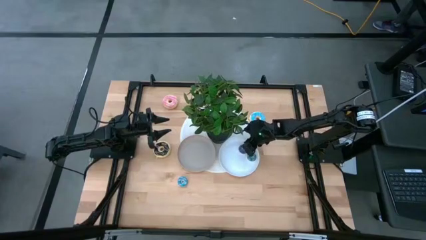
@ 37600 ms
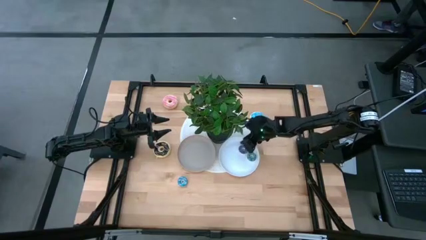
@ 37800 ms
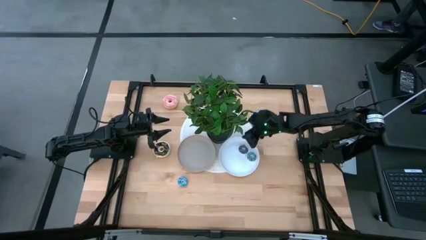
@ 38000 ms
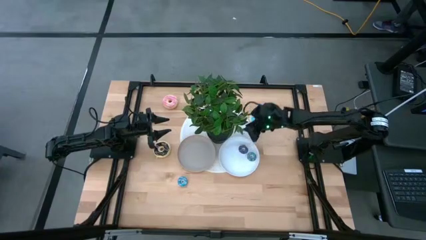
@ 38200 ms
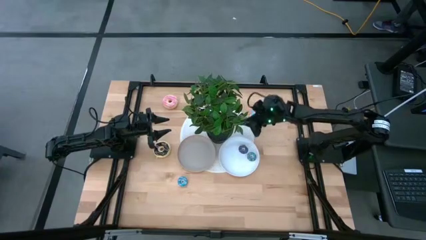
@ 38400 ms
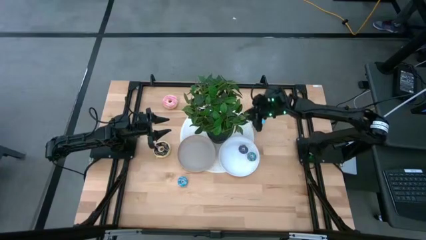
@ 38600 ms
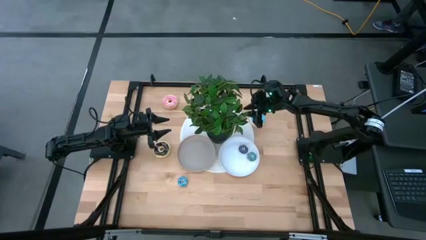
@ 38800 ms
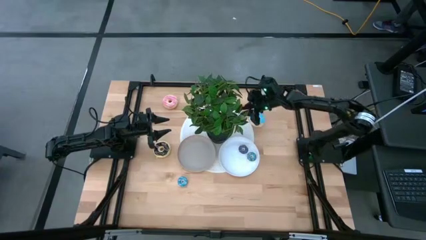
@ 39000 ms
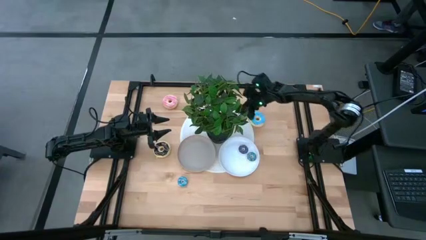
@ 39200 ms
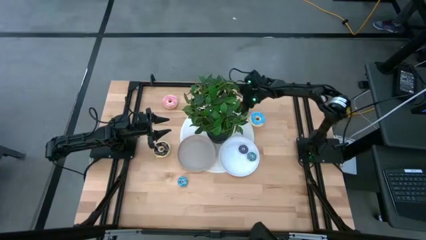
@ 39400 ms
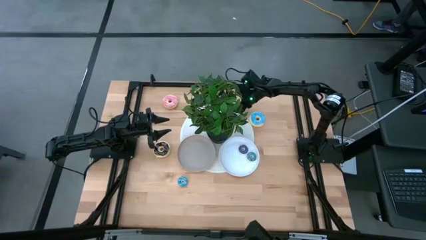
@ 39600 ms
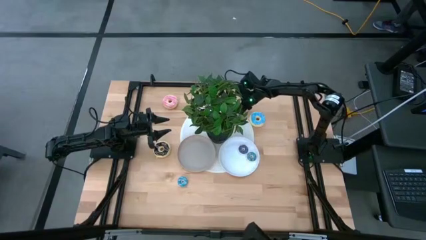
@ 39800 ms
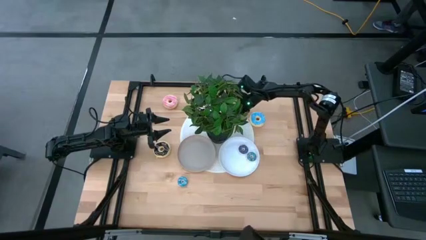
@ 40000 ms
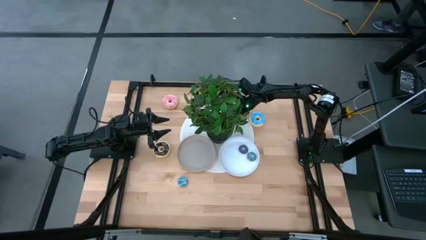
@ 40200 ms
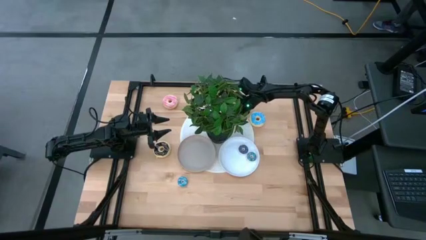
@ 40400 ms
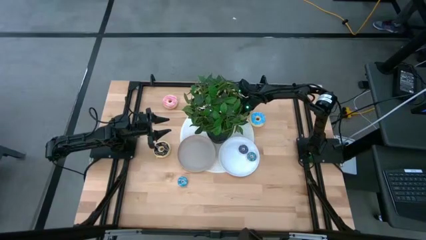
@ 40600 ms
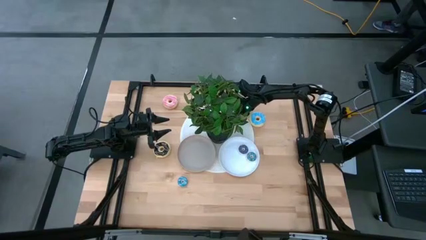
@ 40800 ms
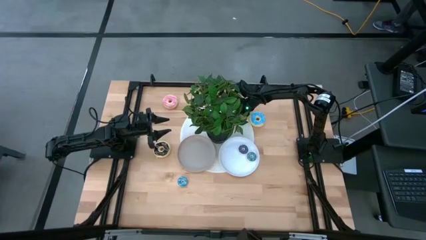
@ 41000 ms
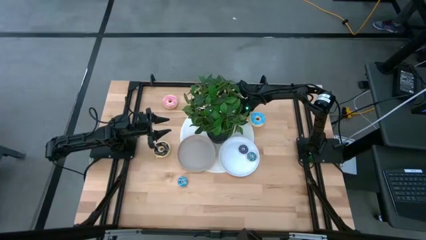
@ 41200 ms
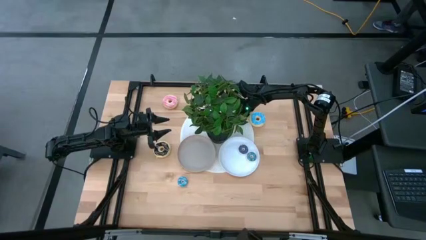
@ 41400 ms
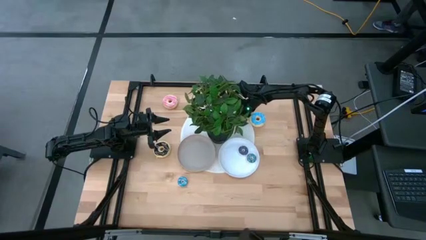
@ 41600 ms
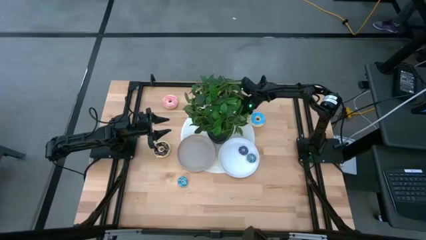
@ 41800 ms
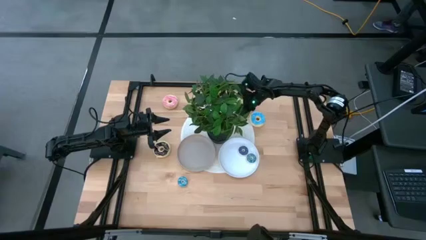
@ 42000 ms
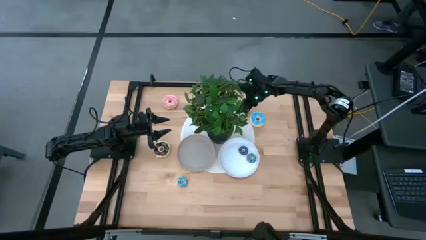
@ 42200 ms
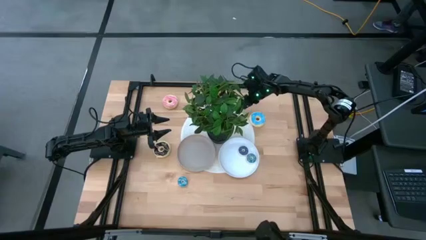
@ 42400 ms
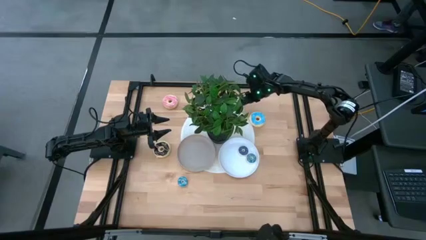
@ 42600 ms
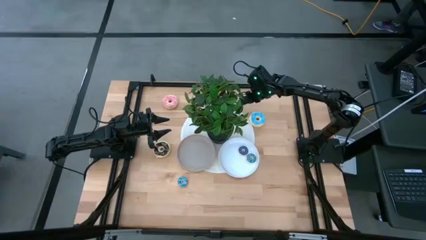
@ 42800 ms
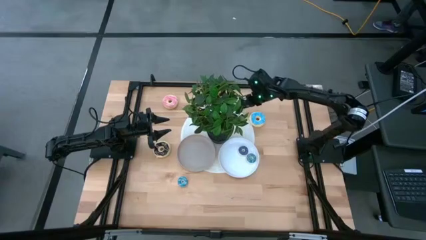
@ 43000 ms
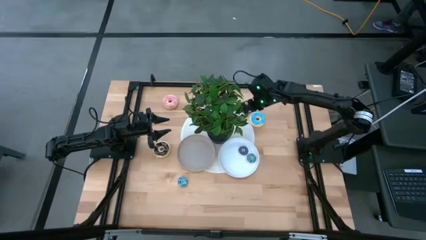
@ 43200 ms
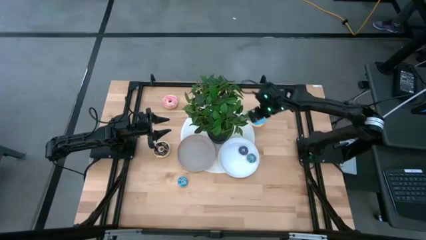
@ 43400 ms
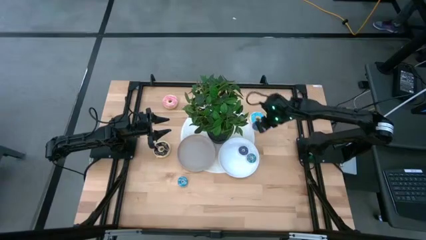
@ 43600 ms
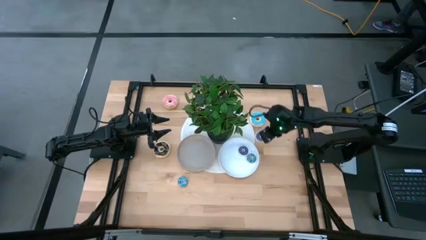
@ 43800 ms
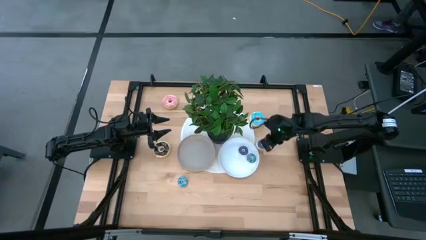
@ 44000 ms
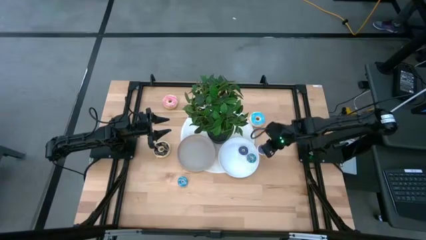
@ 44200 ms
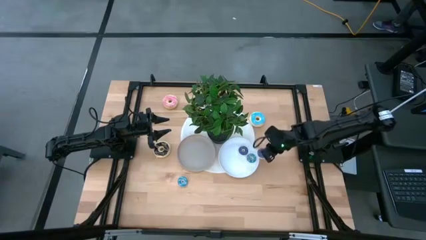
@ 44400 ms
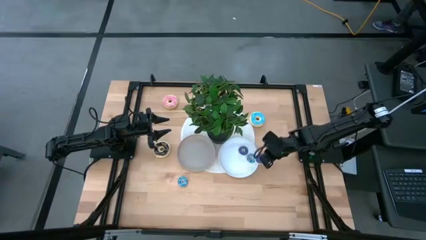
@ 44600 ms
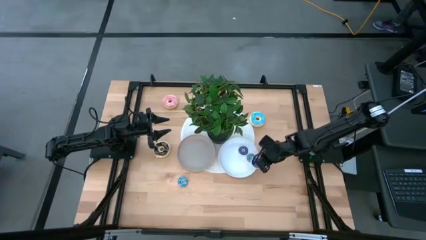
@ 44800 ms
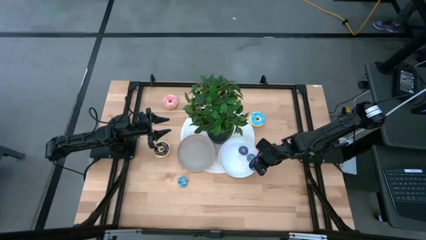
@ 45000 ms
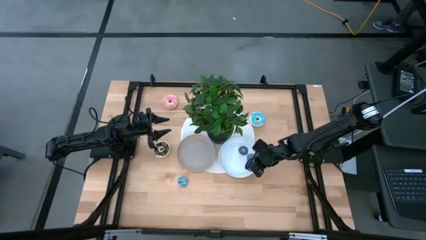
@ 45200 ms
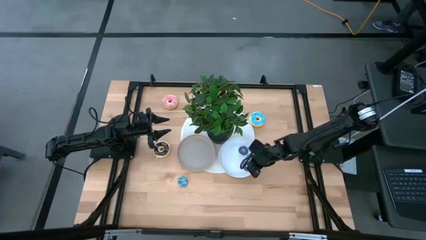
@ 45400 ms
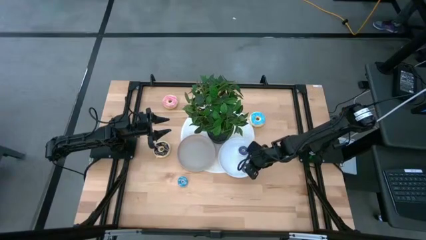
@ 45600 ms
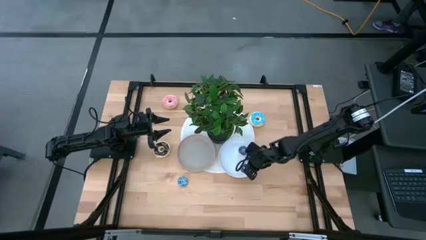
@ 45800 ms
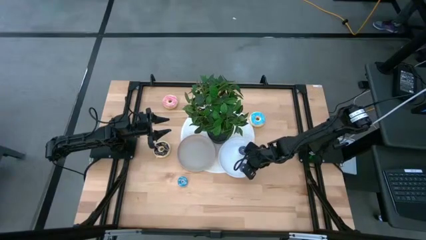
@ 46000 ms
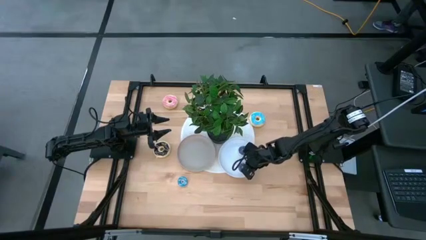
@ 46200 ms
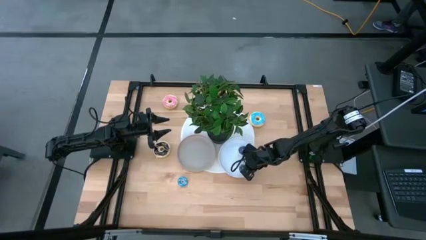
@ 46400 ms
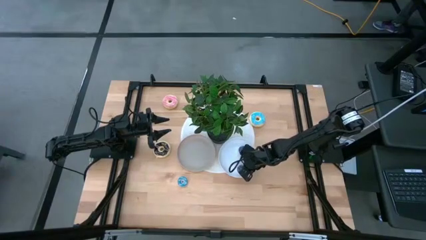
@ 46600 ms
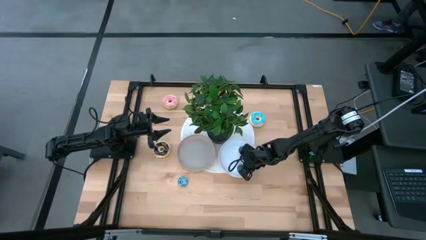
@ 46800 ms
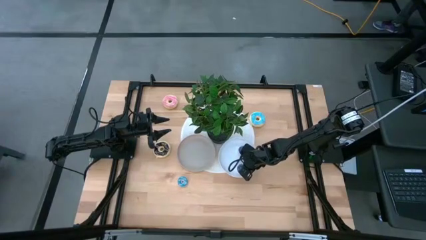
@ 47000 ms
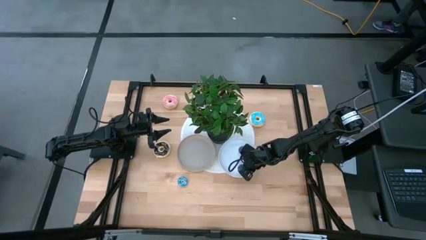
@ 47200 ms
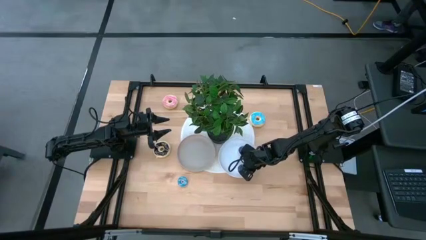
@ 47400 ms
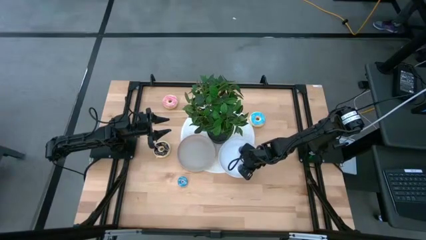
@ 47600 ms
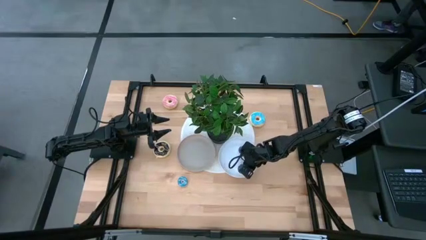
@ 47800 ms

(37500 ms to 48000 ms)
Task: Pick & Place donuts
Put the small dark blue donut on the white plate

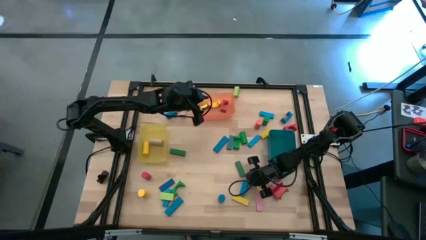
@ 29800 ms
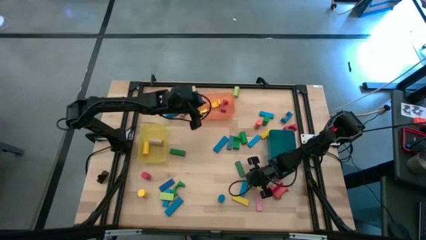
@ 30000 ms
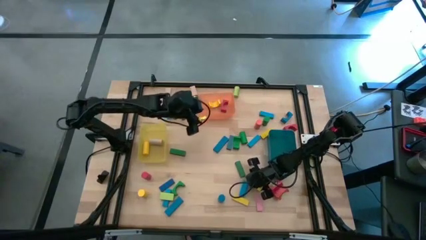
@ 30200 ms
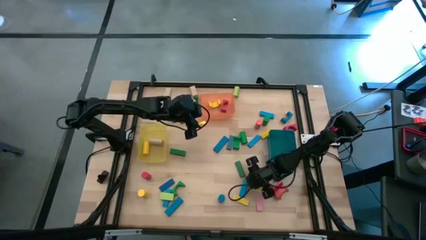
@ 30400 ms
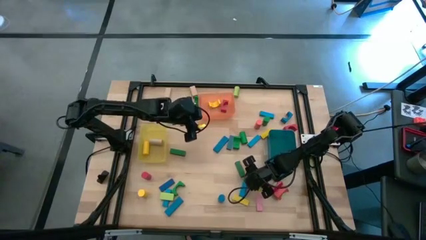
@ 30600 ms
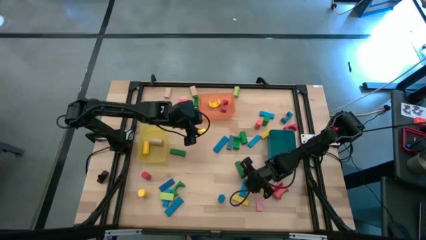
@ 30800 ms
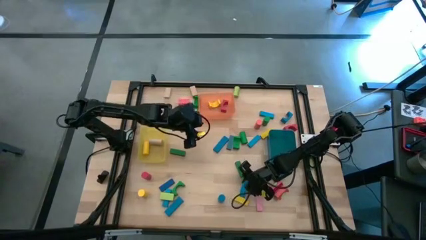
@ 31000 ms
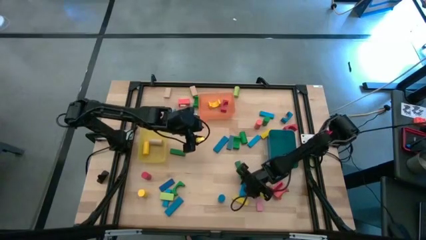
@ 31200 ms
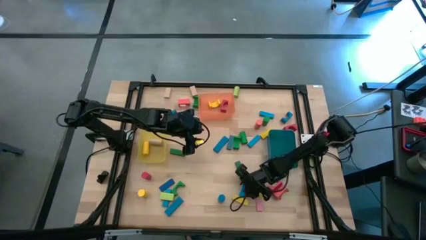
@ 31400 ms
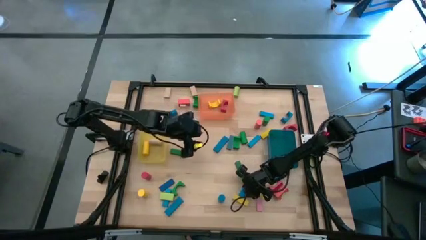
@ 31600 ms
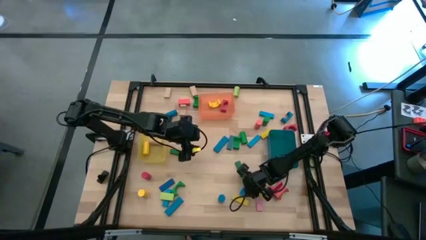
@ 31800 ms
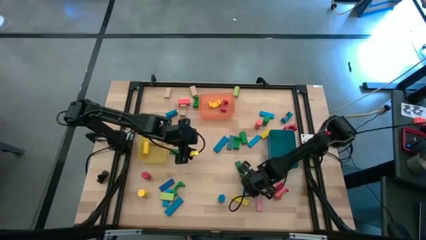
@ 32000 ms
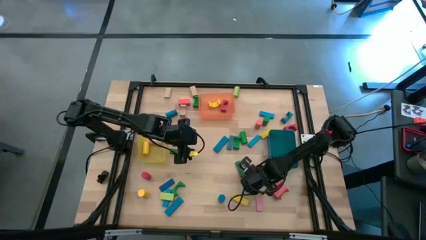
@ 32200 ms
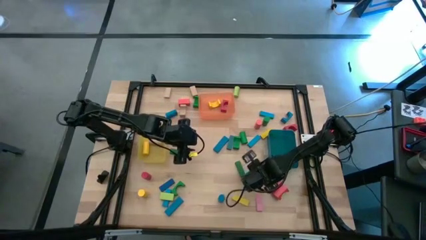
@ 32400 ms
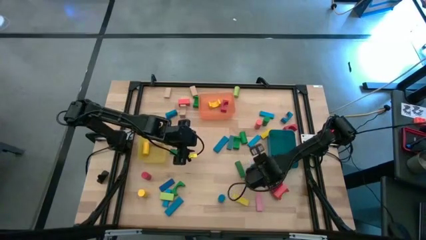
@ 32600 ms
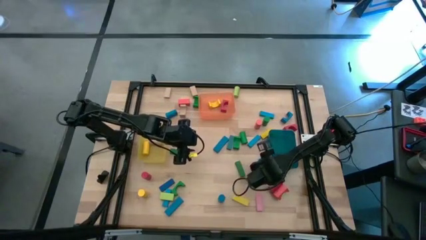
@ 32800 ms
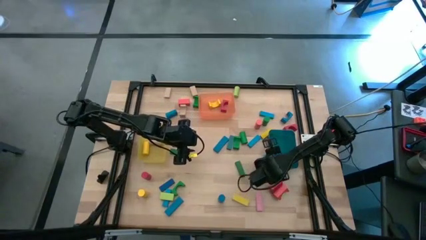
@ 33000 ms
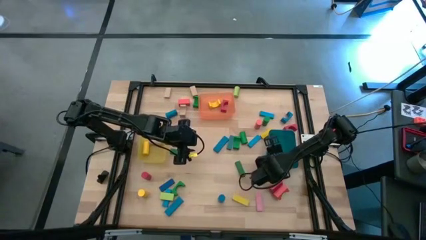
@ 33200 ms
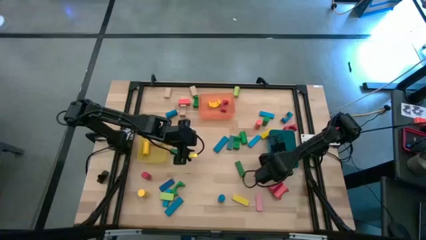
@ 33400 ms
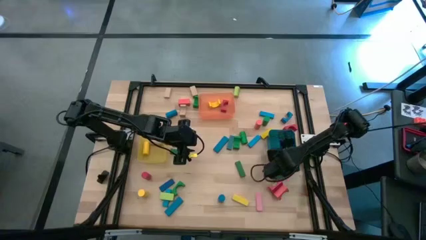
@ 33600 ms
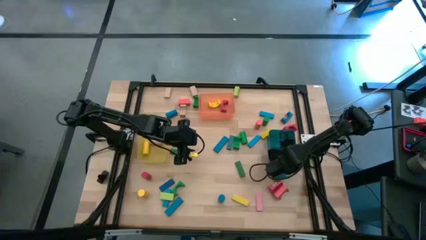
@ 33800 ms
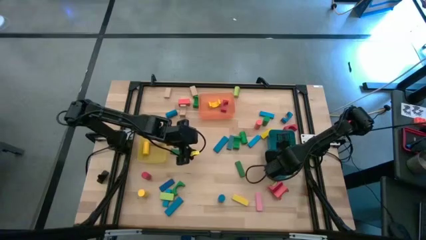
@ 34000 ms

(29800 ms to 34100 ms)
Task: Sort blocks by size
Put the blue rectangle block into the blue bin
